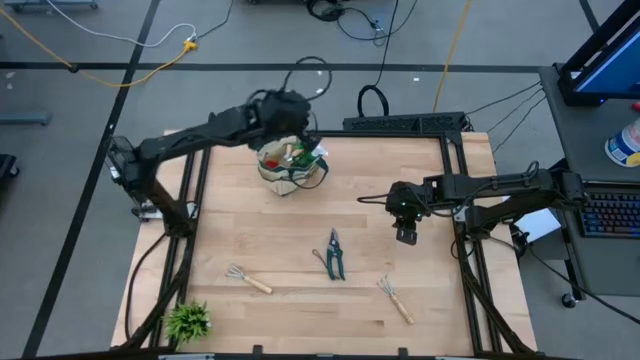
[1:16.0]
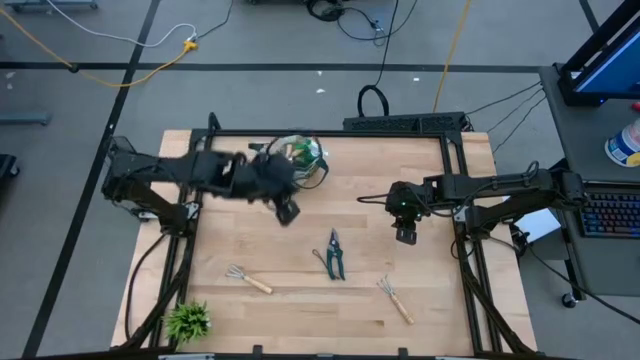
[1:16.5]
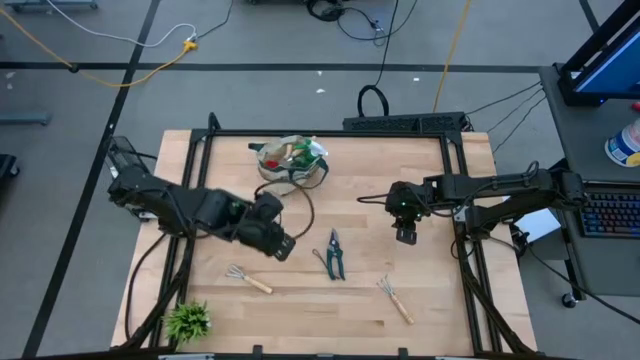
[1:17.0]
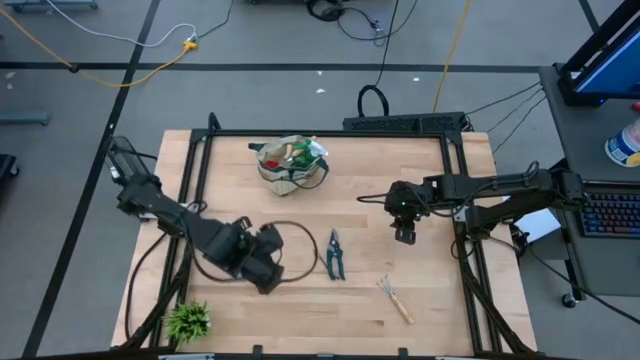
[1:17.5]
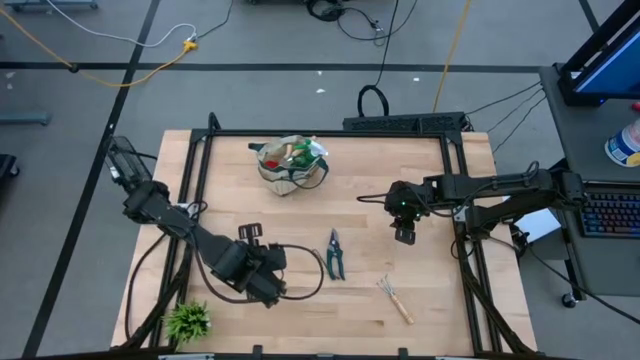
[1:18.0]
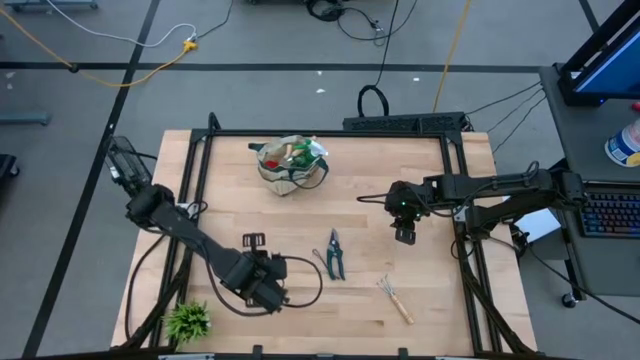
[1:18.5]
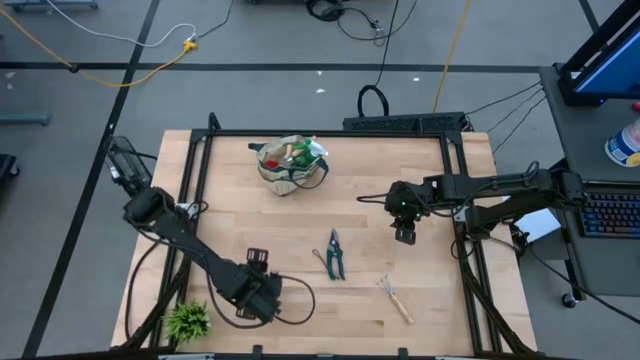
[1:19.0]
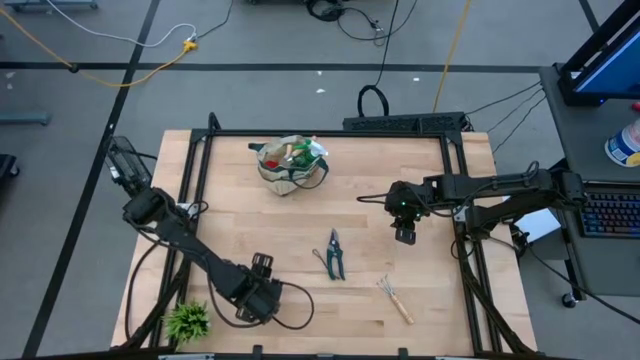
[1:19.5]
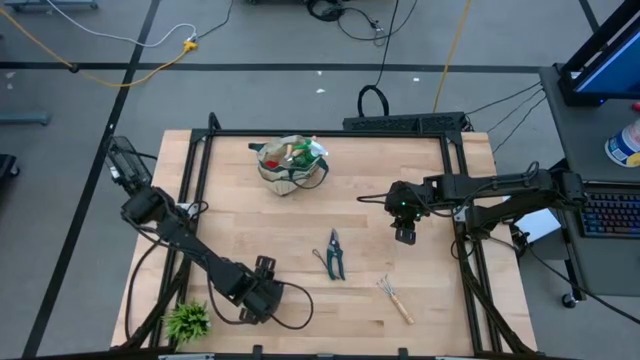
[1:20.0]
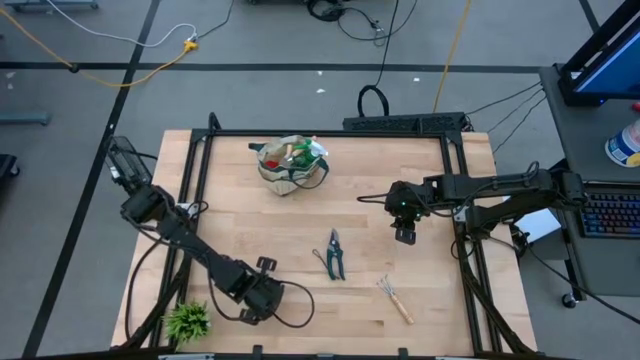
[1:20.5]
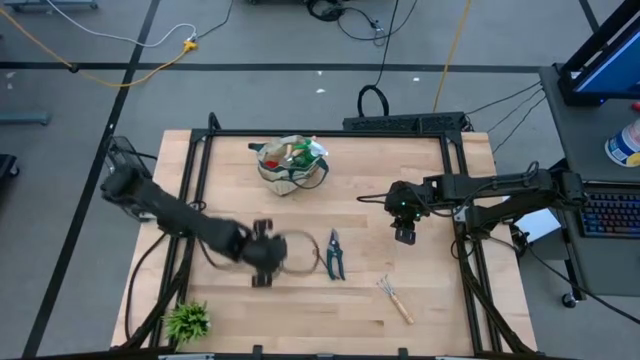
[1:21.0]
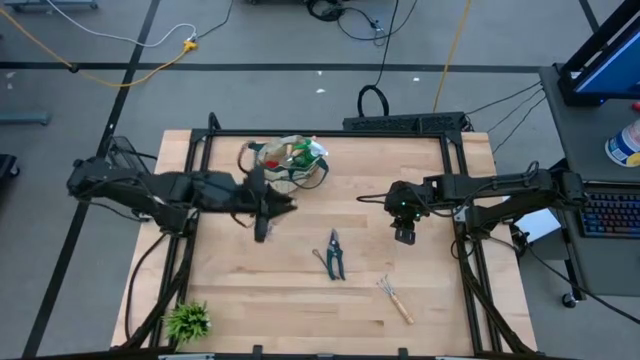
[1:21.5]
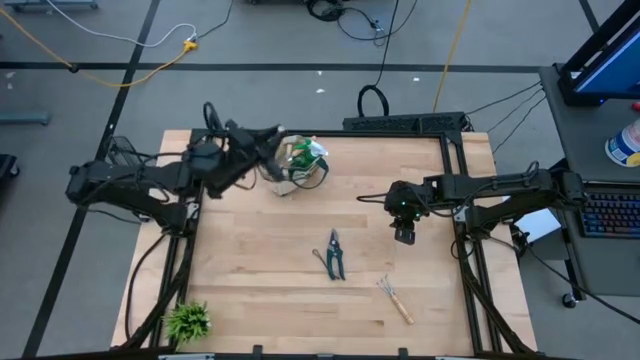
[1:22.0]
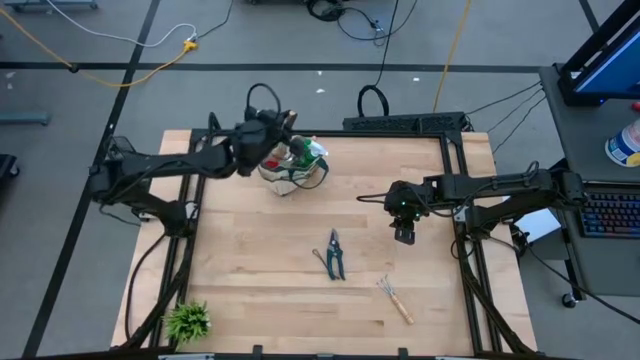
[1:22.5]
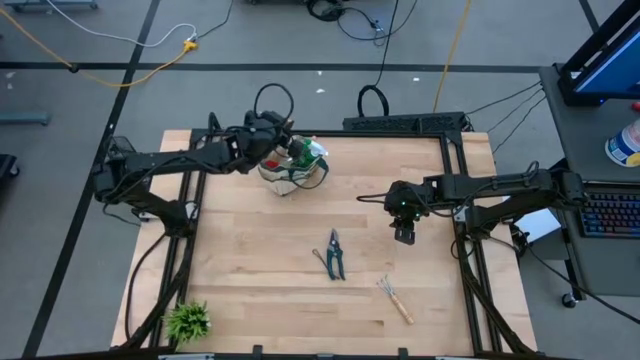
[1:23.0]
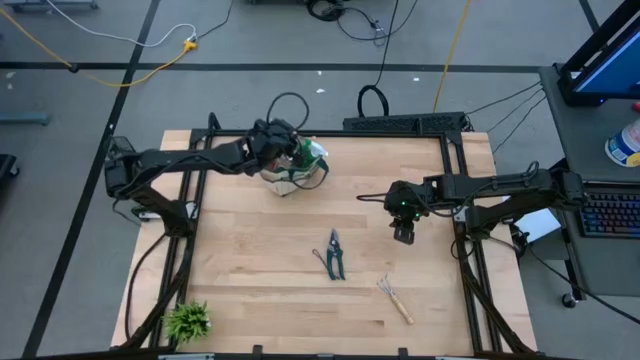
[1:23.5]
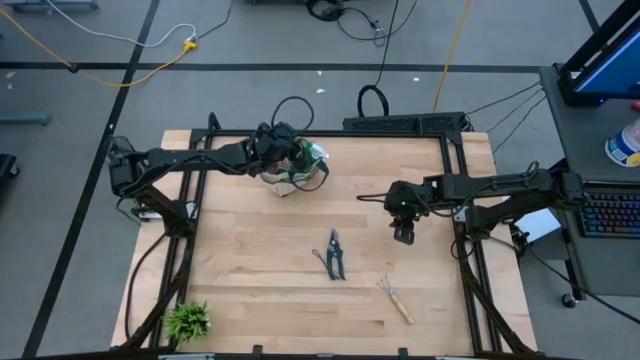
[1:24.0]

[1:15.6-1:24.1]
Task: Pick & Place Garden tools in Gardening bag
Put the left hand rake into the gardening bag

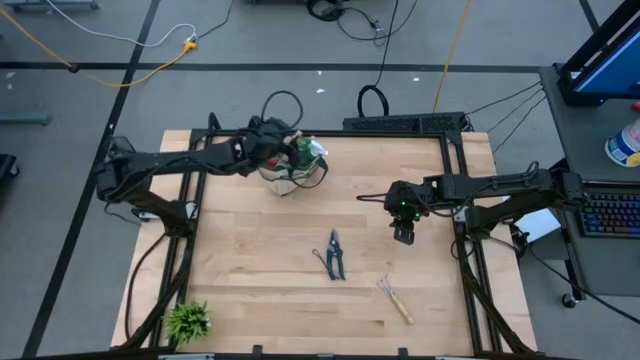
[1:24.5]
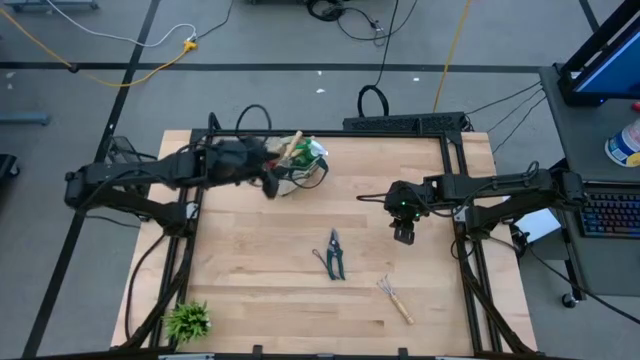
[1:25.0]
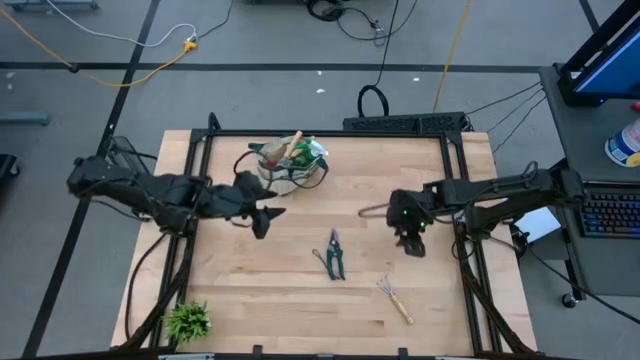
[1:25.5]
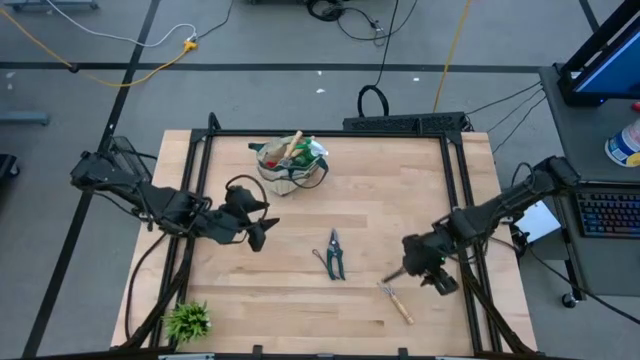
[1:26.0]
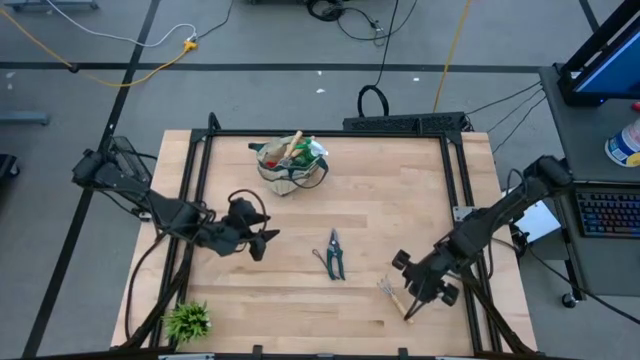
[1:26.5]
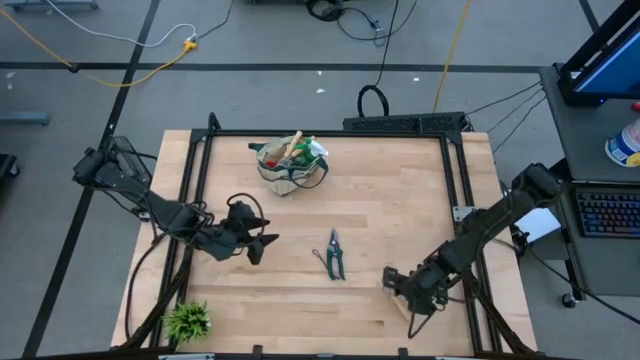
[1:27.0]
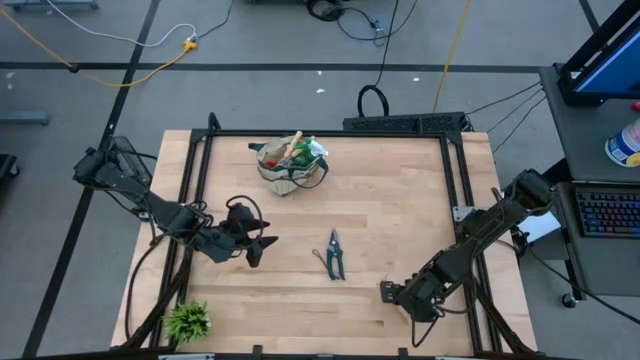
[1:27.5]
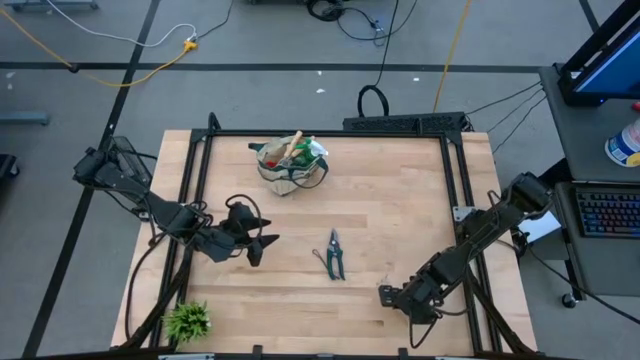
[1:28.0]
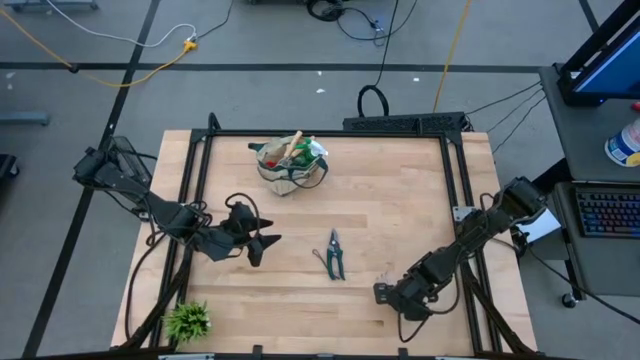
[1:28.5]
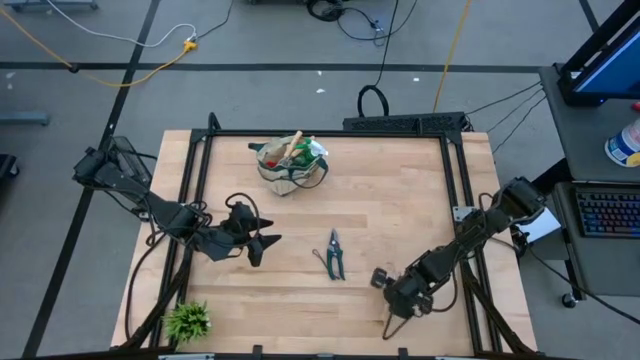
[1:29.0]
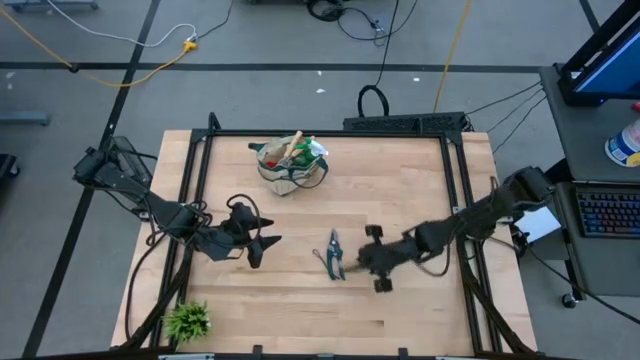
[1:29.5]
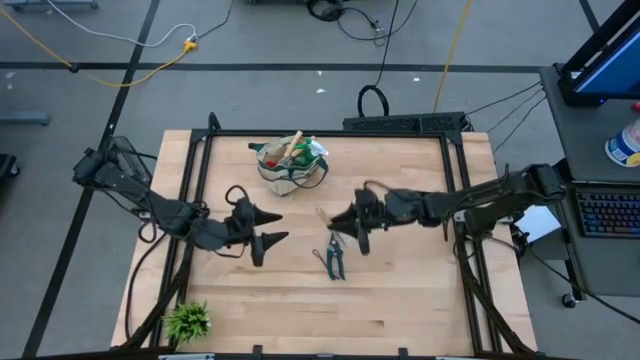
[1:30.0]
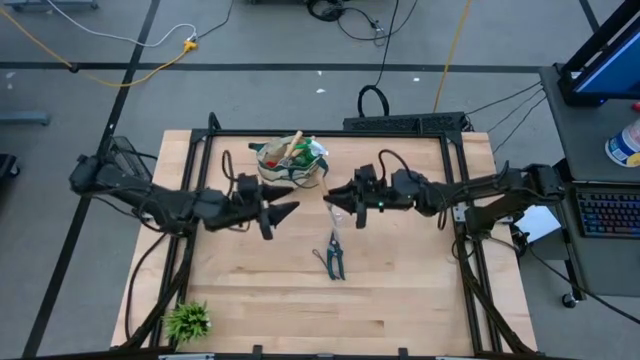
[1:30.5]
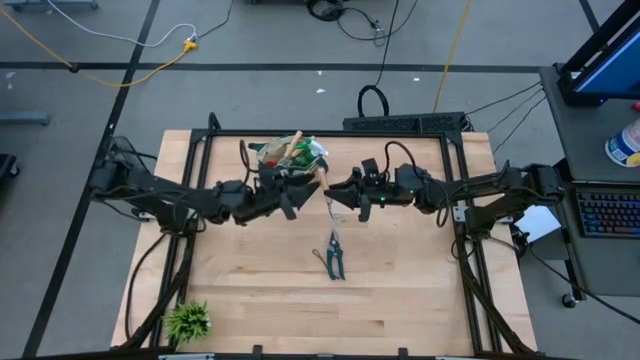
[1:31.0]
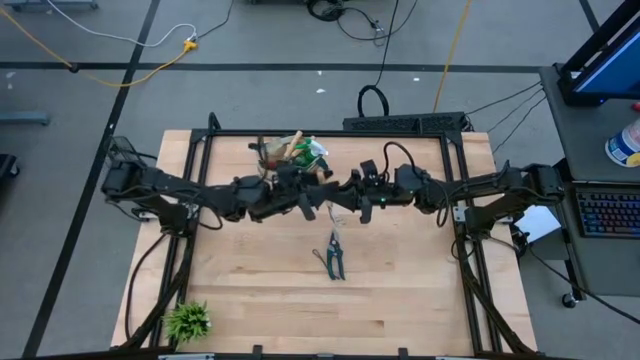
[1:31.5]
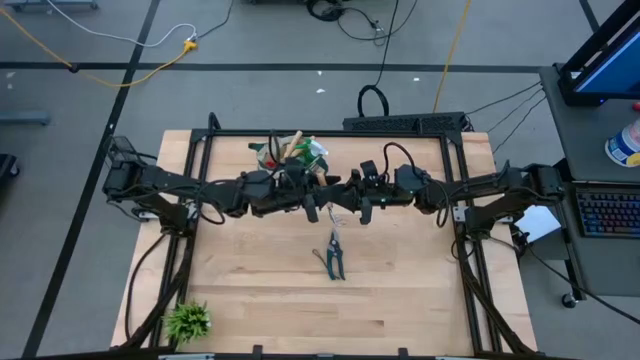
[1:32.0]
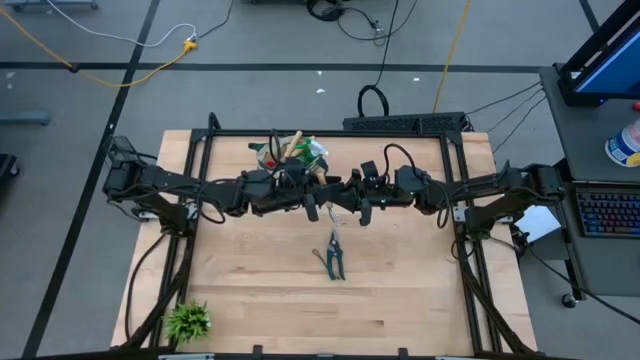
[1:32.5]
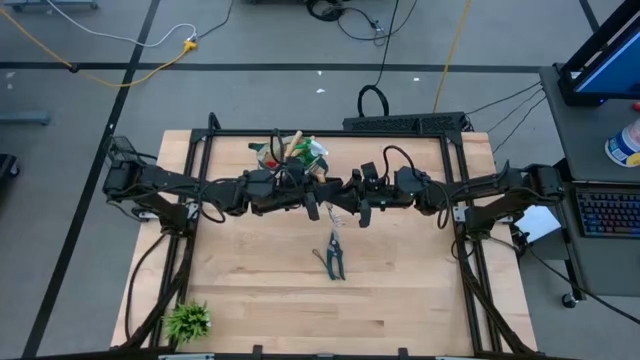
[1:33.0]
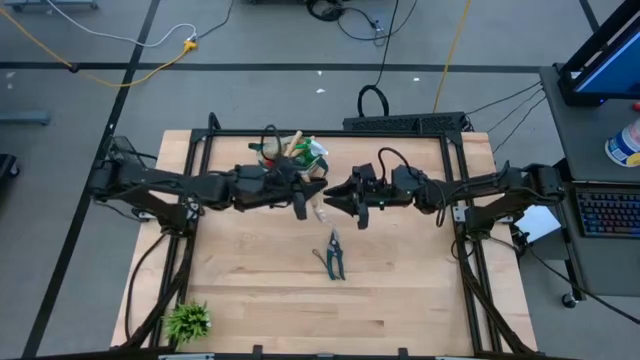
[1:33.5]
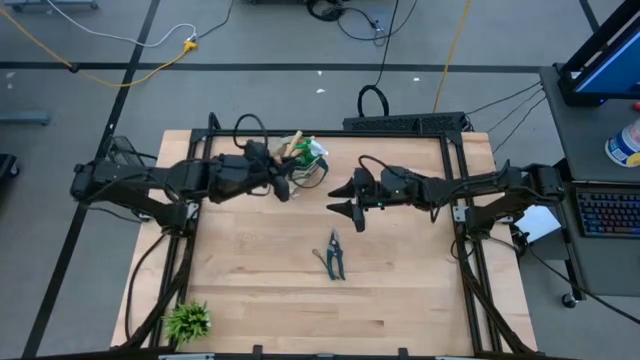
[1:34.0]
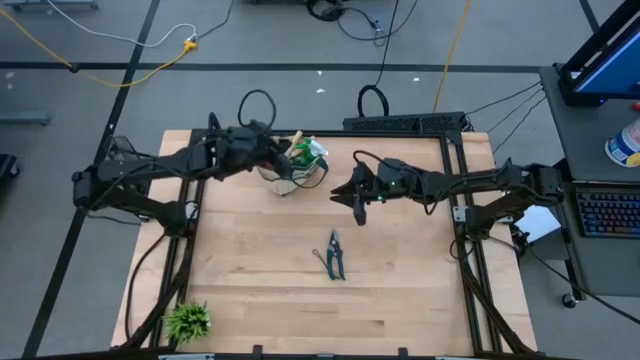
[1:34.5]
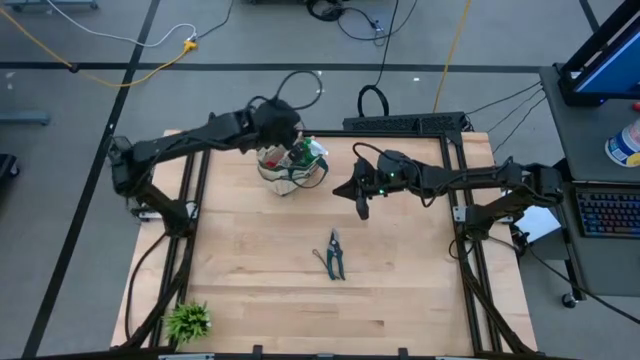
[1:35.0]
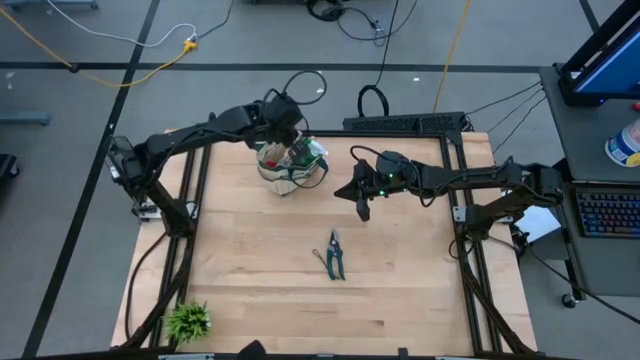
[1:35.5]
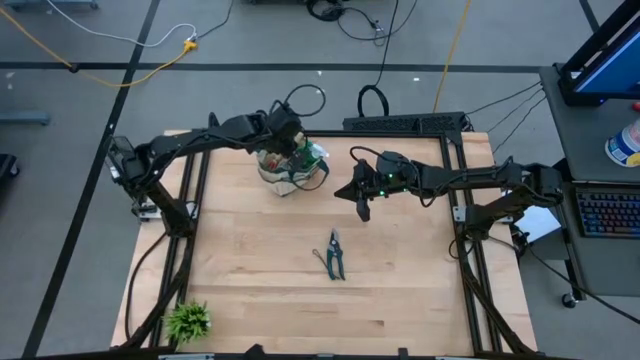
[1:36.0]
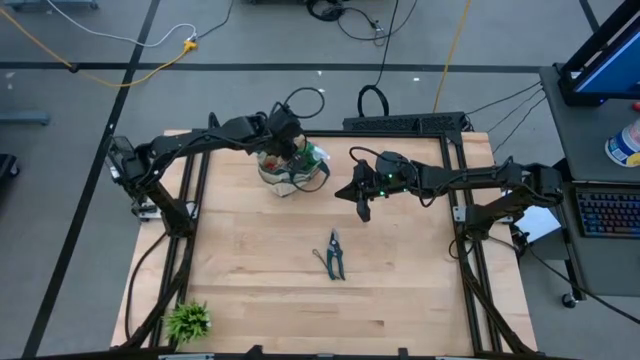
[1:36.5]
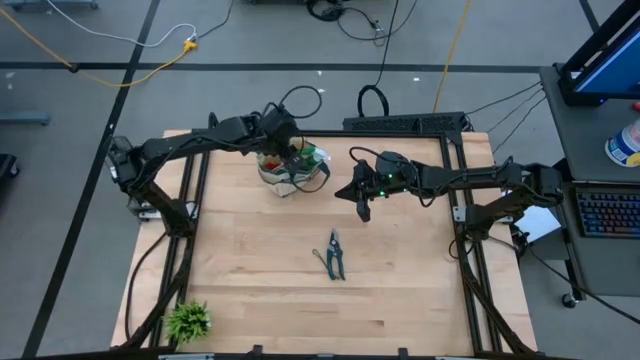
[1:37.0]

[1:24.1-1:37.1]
Put the hand rake into the gardening bag
